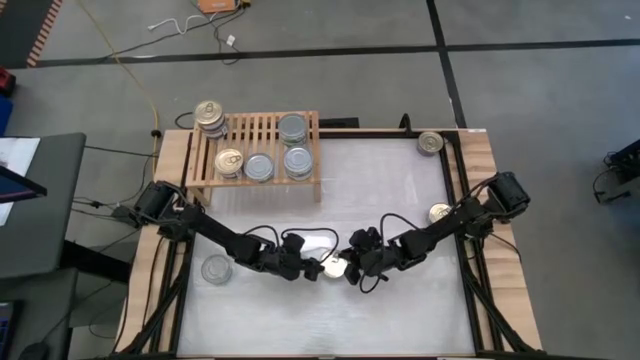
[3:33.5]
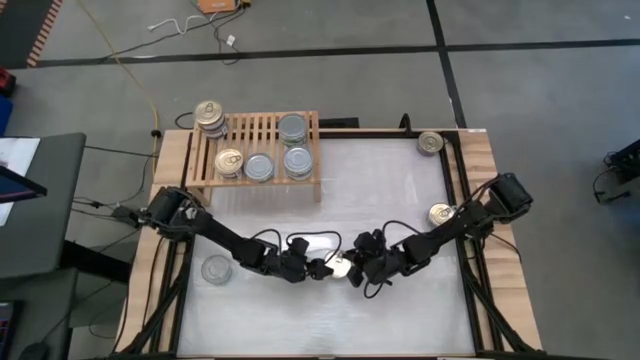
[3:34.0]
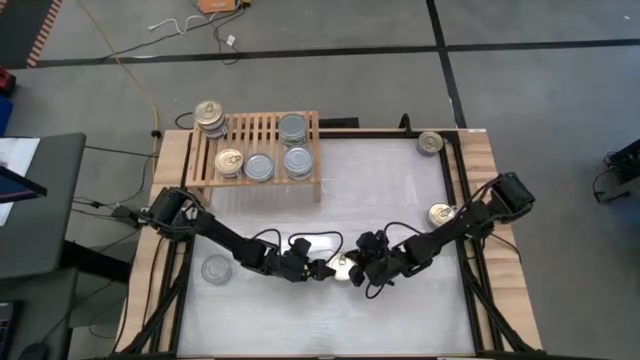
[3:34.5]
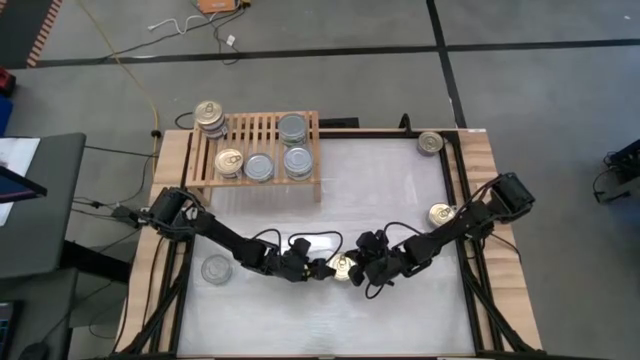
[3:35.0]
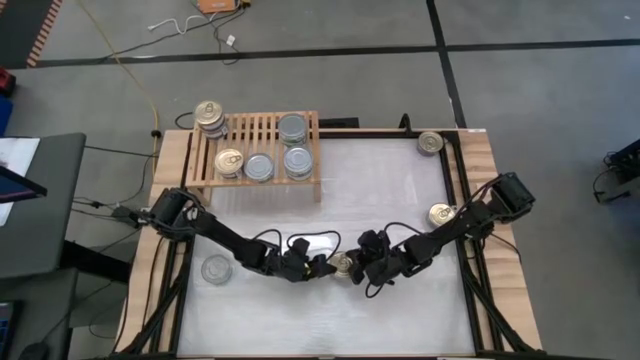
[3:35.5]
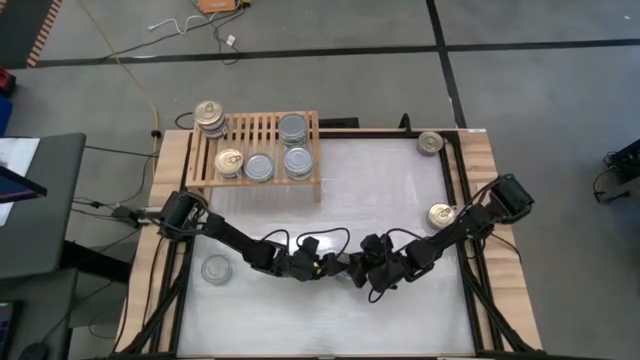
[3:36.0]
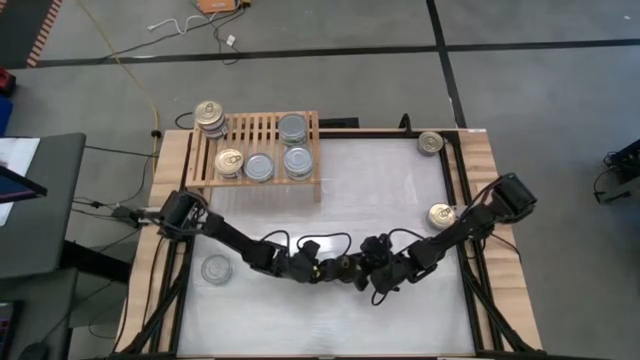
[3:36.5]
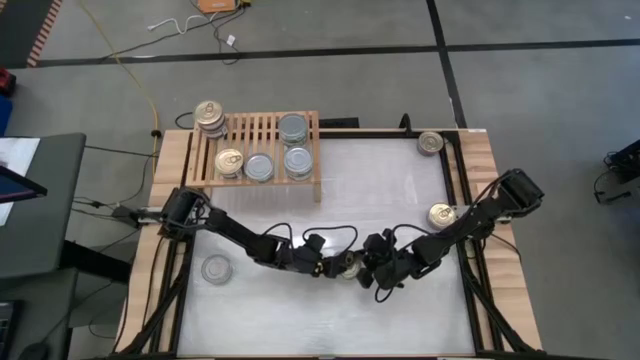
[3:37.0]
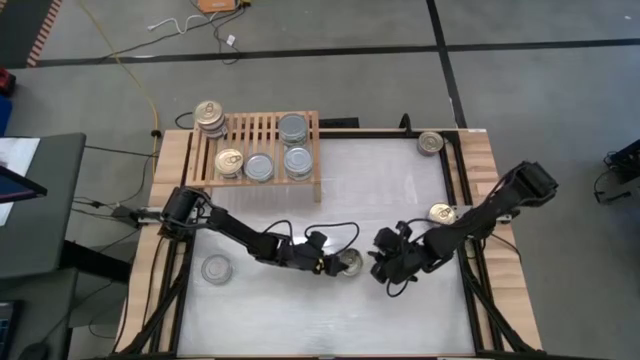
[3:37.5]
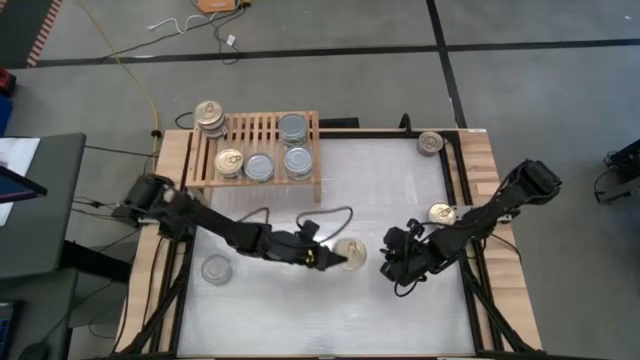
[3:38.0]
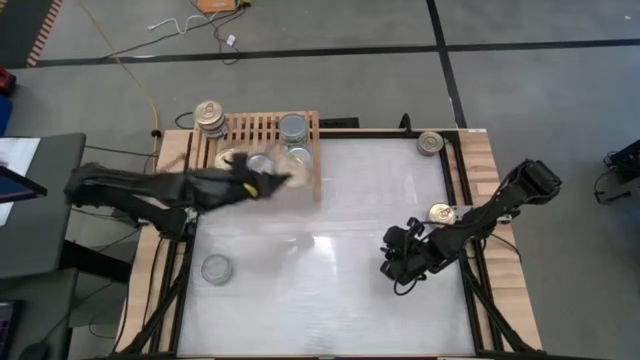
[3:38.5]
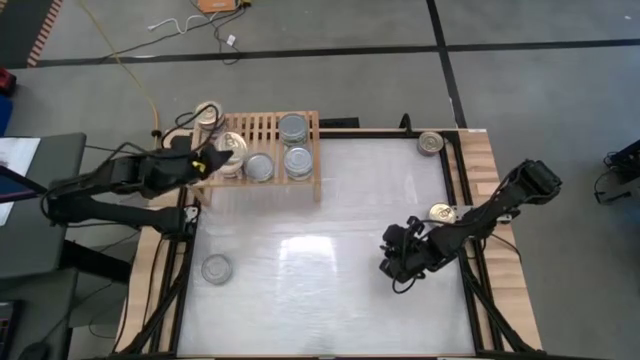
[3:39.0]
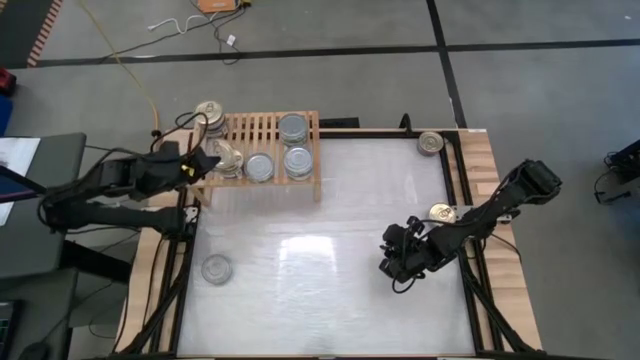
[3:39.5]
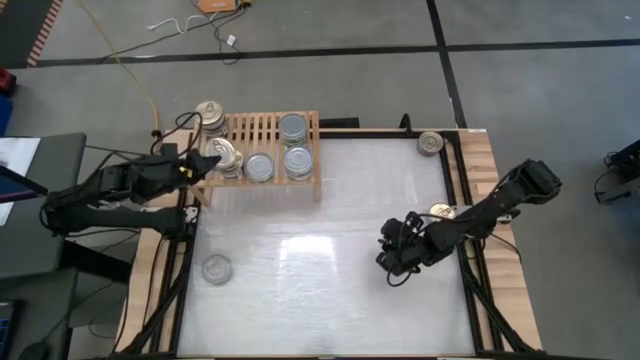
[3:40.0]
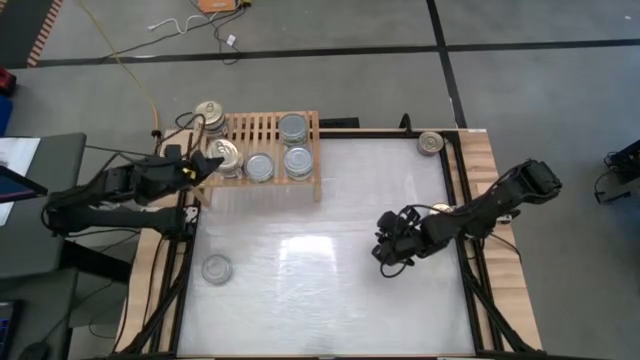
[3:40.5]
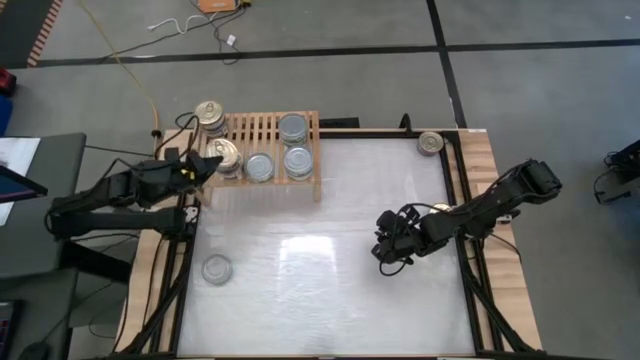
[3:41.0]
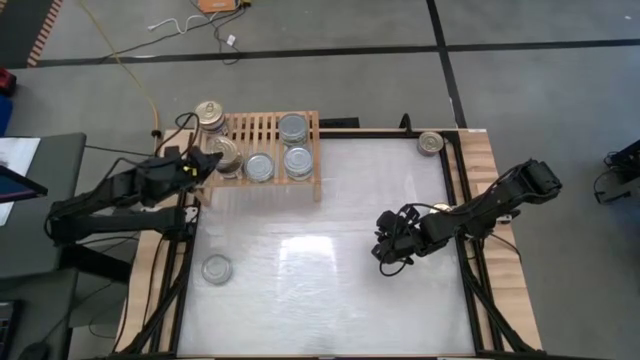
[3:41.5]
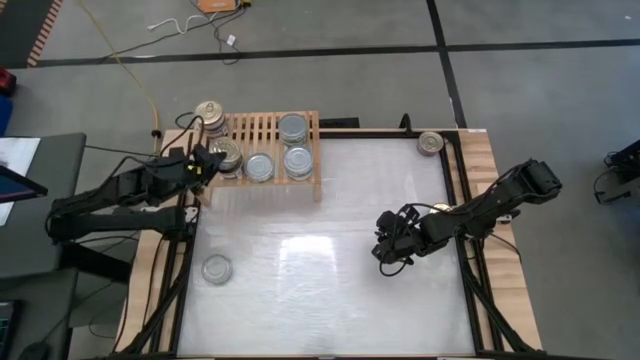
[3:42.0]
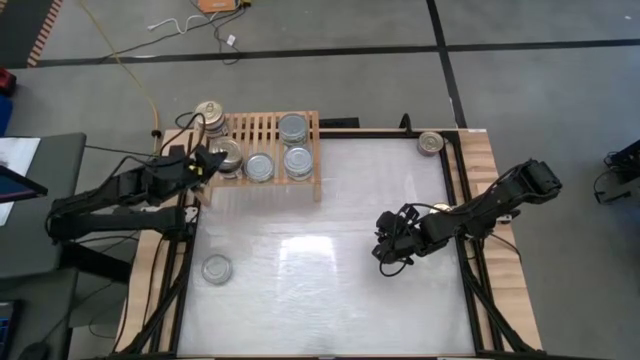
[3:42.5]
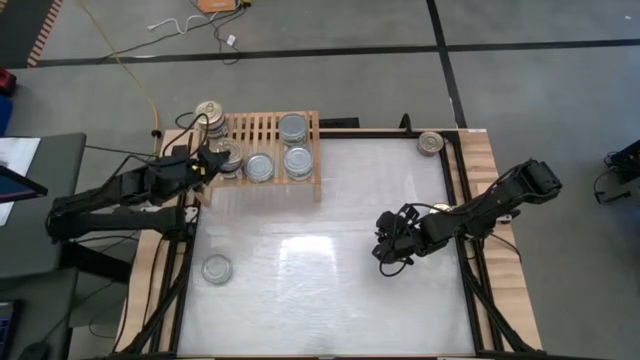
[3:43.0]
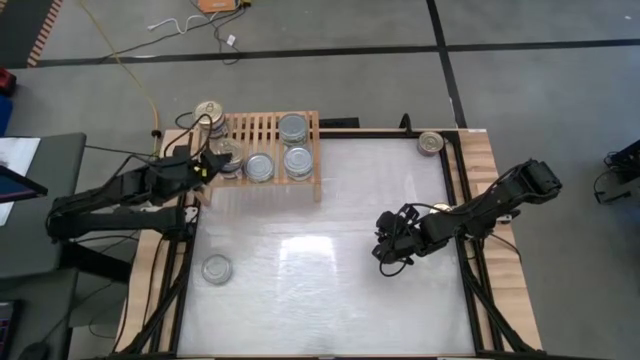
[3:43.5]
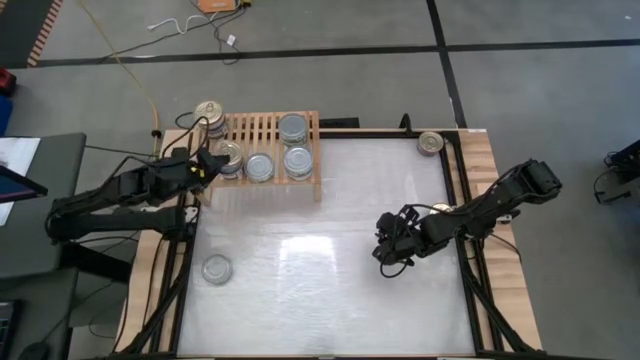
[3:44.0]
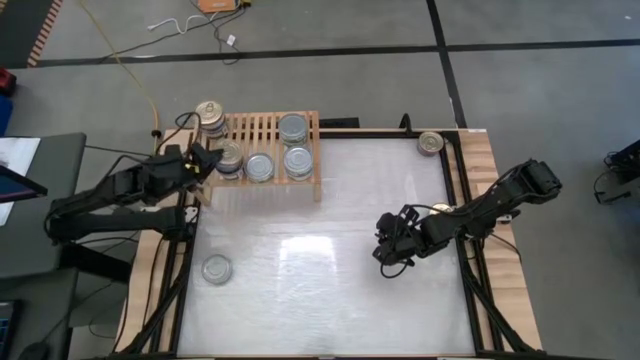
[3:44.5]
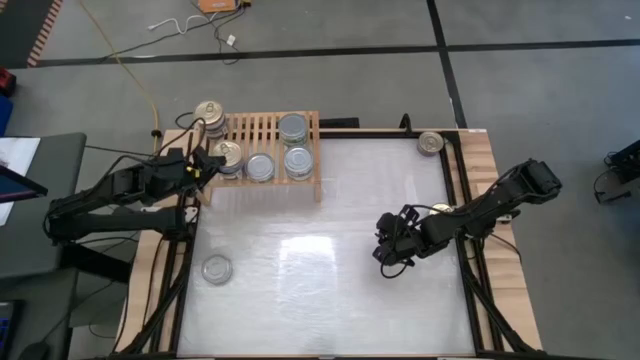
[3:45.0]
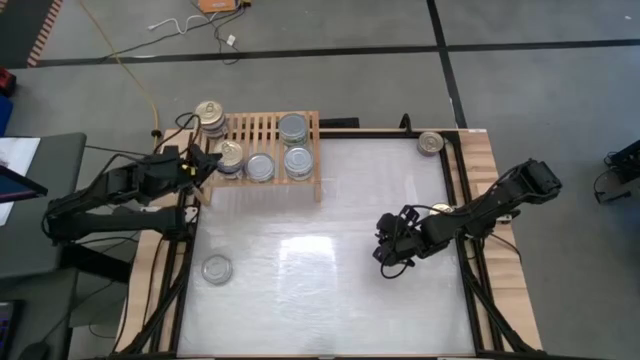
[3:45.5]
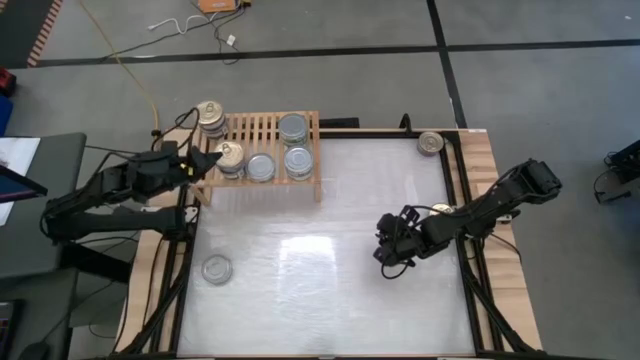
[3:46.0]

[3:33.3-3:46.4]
Task: Stack canned seafood by type on shelf
Stack the blue tuna can on top of the bottom blue tuna can on the shelf

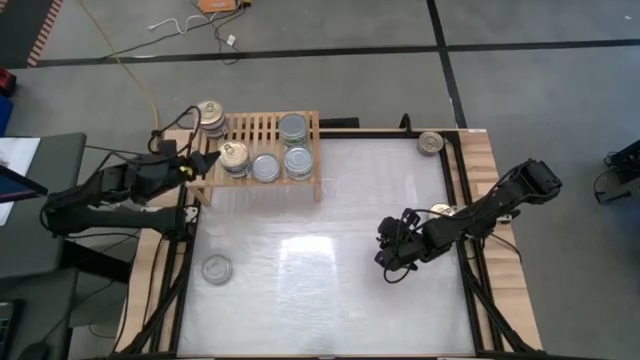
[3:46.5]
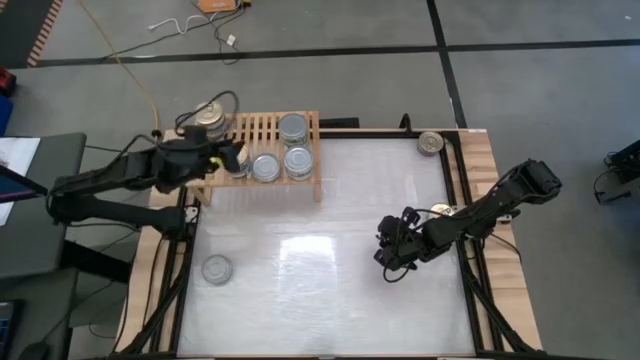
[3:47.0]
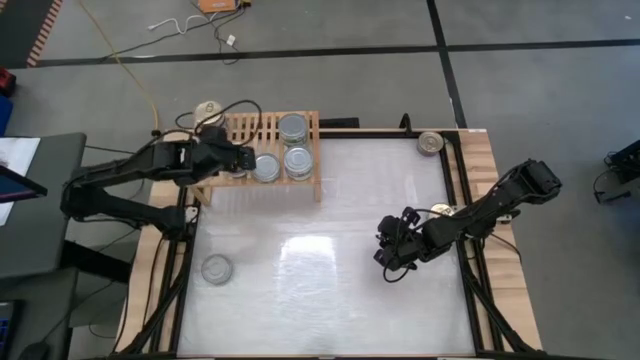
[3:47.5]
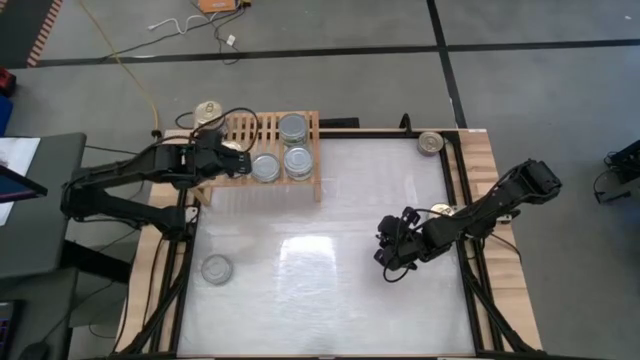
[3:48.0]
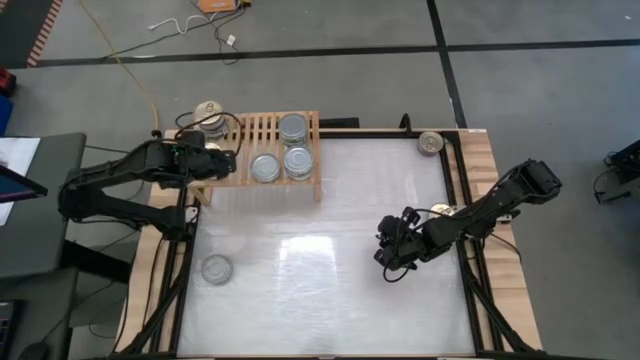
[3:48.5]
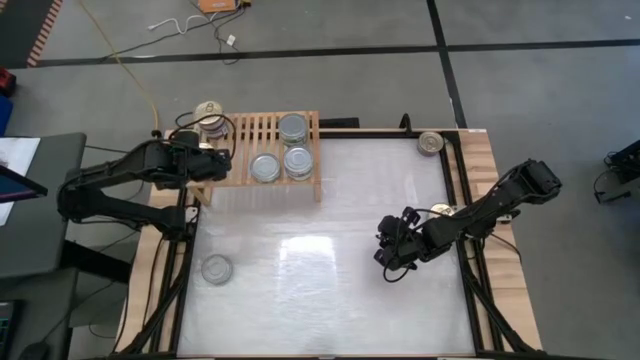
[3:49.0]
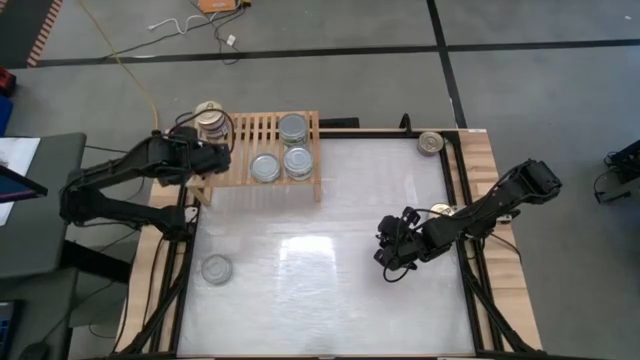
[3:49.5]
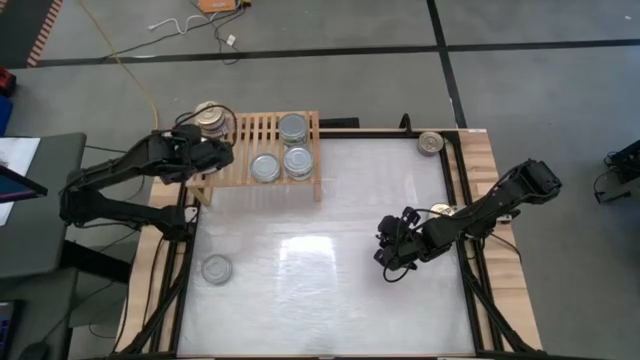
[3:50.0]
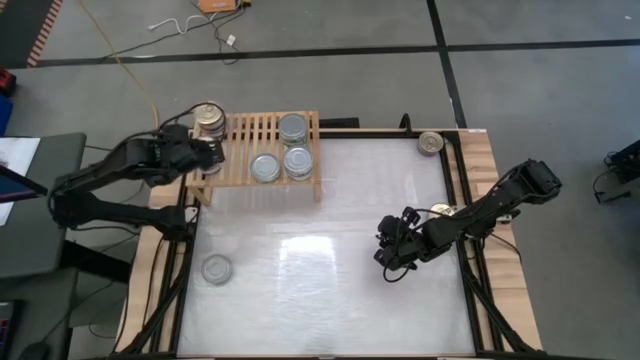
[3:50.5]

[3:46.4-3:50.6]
Adjust the stacked blue tuna cans on the shelf

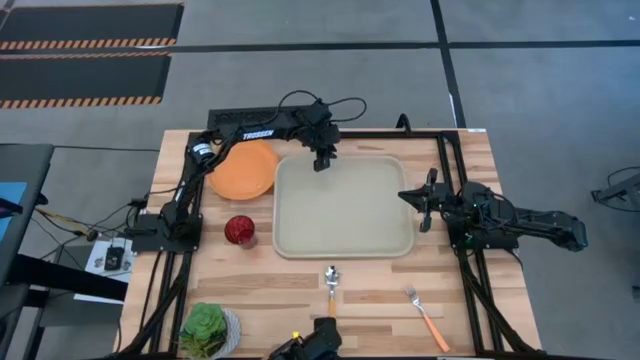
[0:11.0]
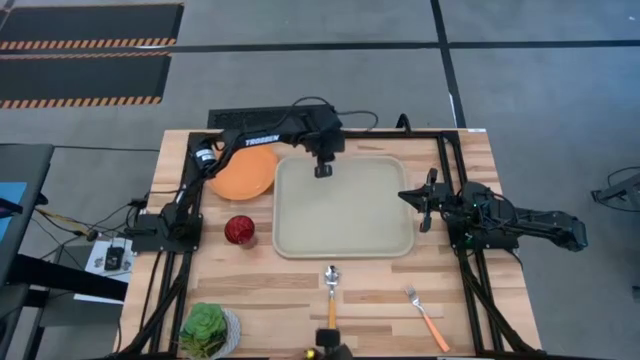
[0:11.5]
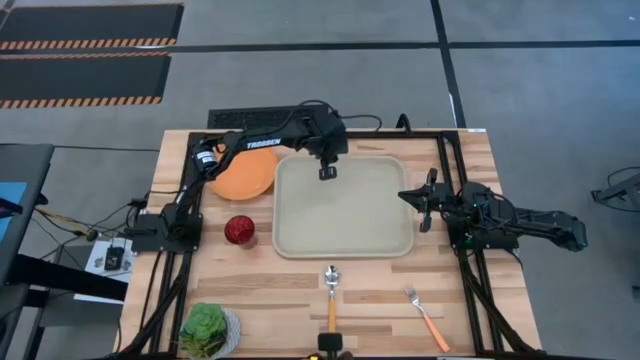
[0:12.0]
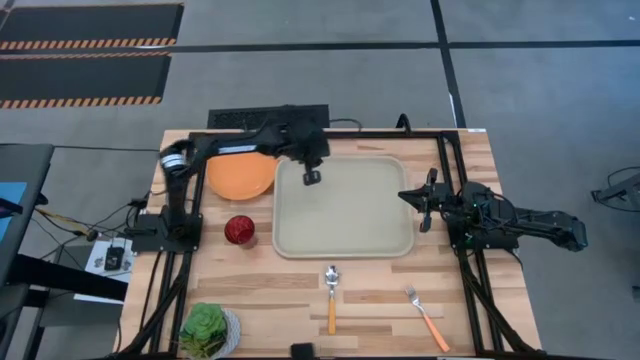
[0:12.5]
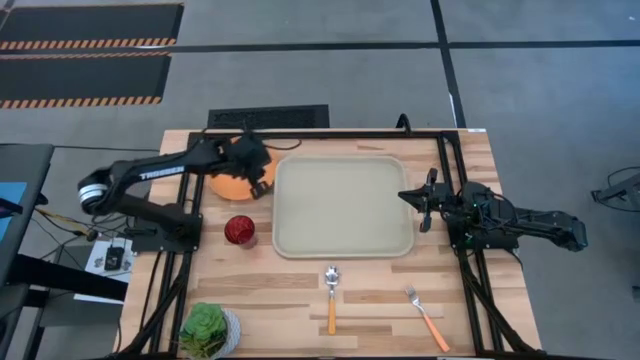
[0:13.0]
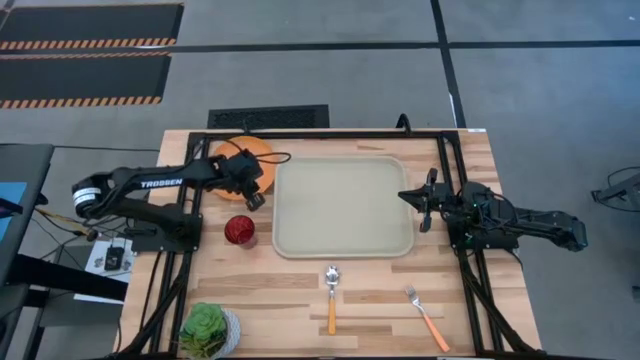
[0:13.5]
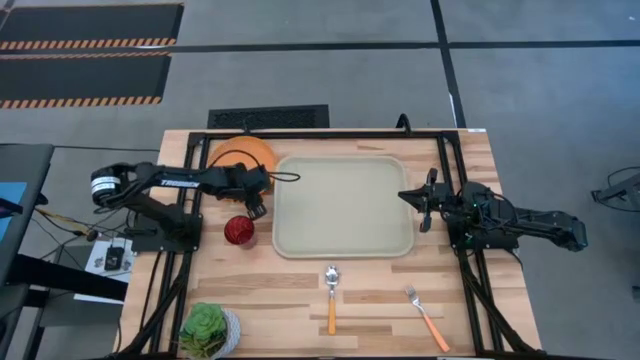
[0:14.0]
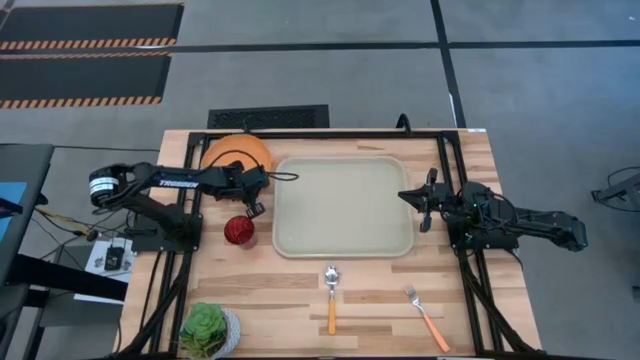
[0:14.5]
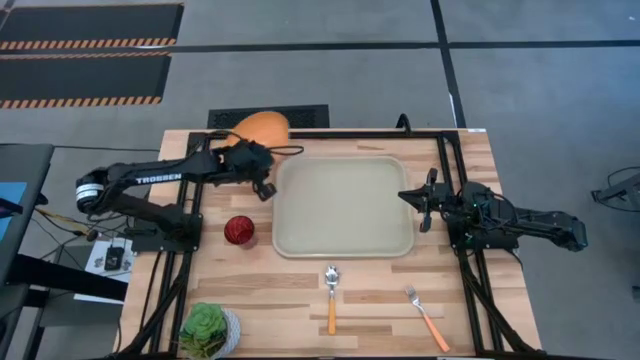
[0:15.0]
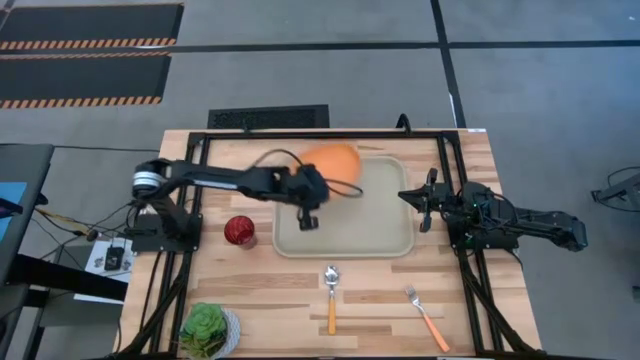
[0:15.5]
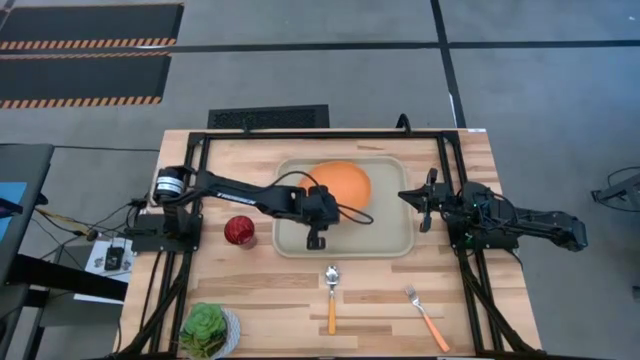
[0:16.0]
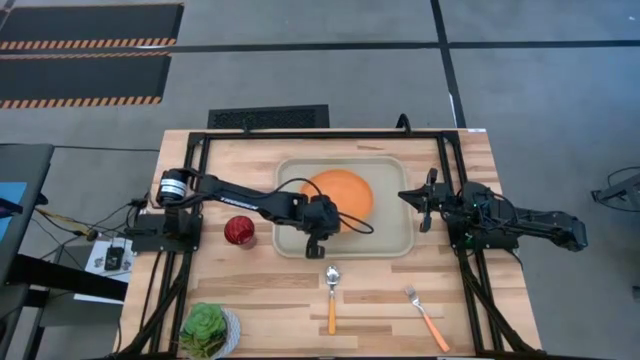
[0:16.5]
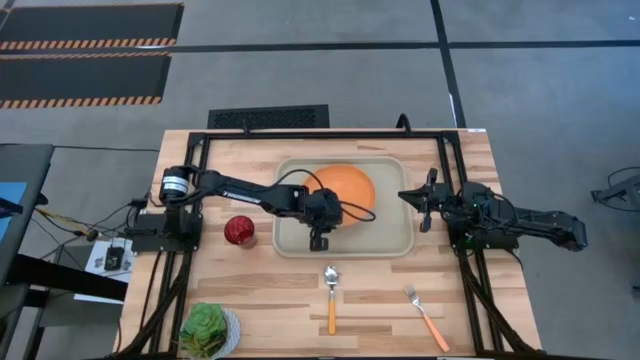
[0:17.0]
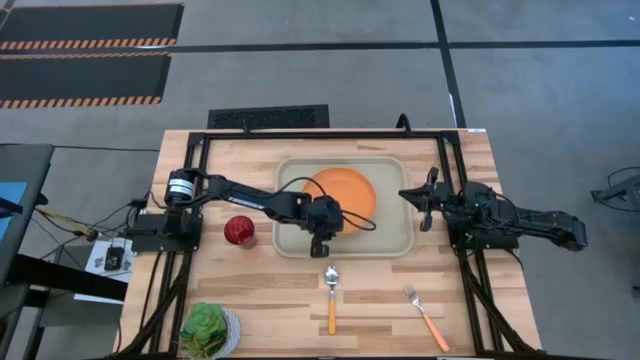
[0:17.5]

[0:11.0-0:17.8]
Task: Pick and place plate/cup/fork/spoon on tray
Put the orange plate on the gray serving tray
